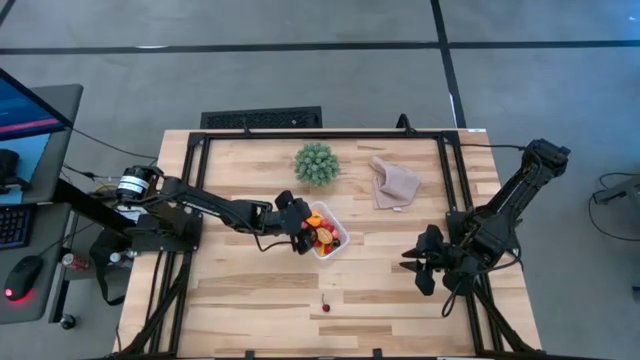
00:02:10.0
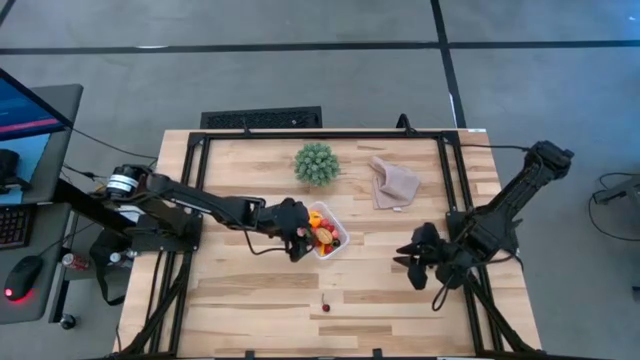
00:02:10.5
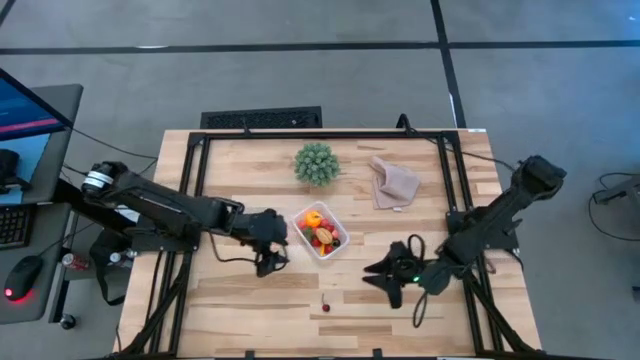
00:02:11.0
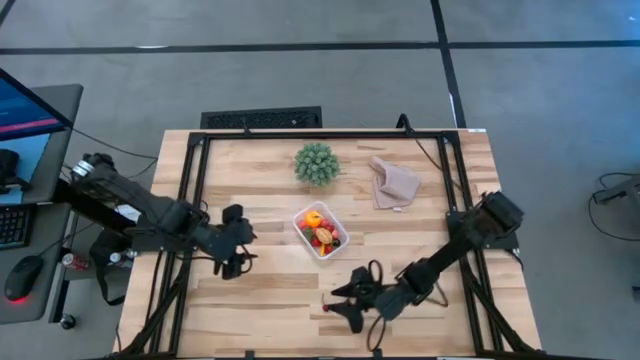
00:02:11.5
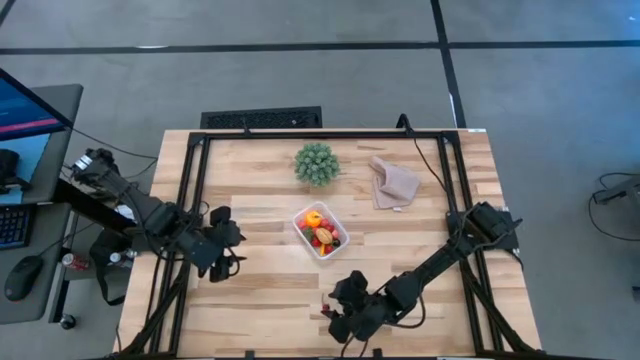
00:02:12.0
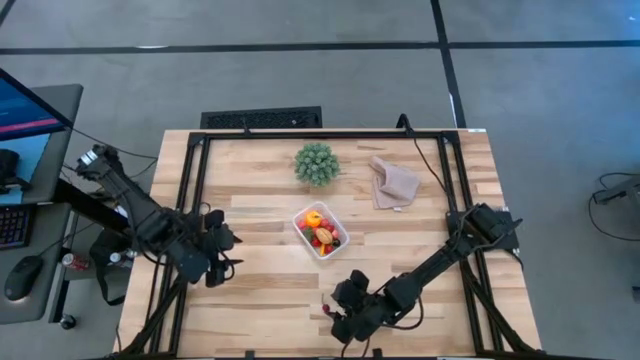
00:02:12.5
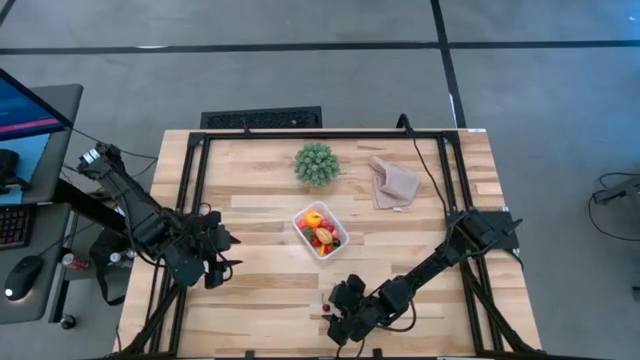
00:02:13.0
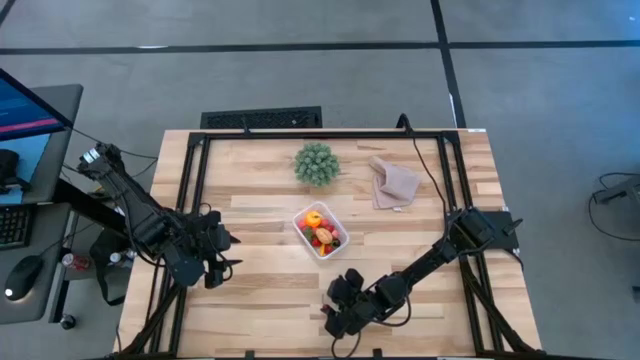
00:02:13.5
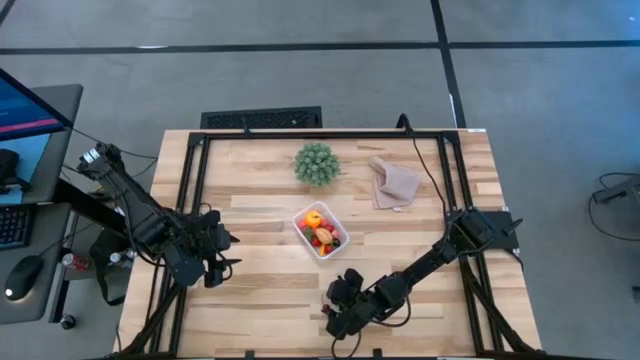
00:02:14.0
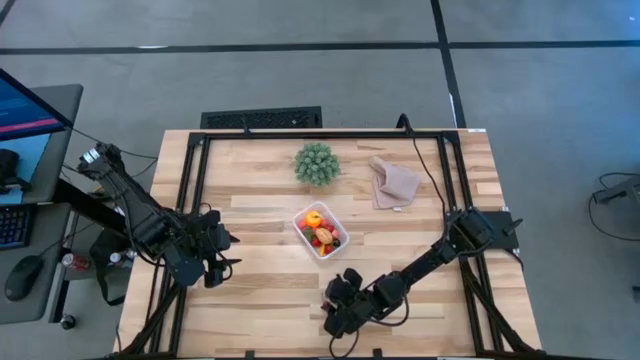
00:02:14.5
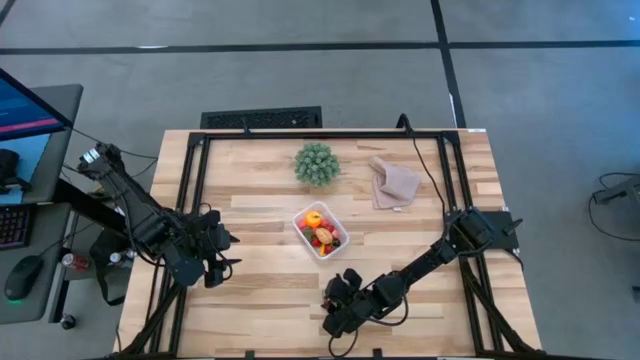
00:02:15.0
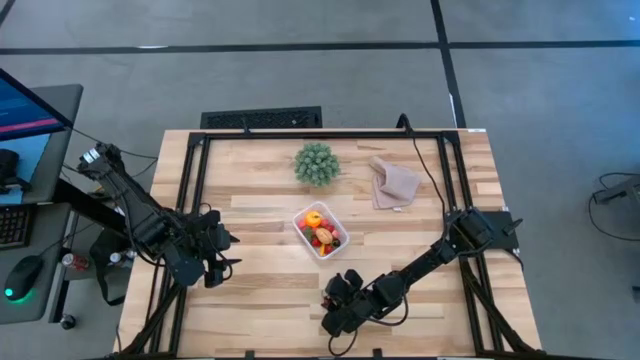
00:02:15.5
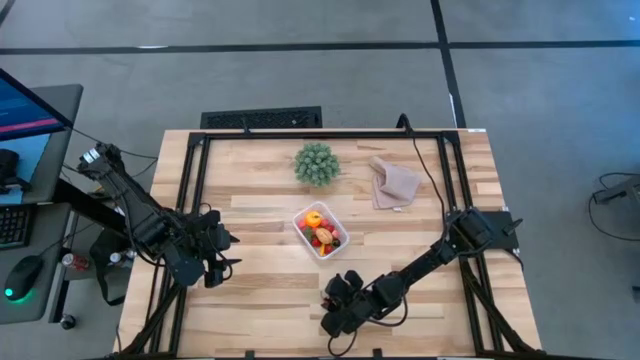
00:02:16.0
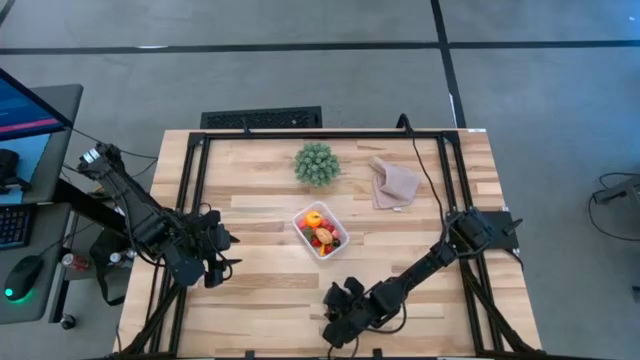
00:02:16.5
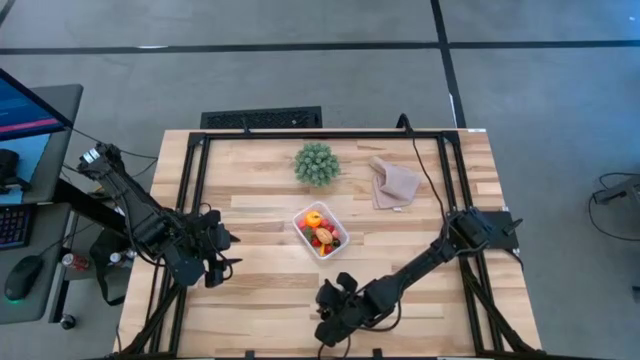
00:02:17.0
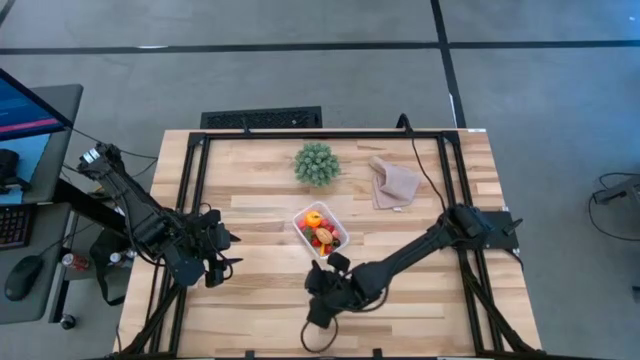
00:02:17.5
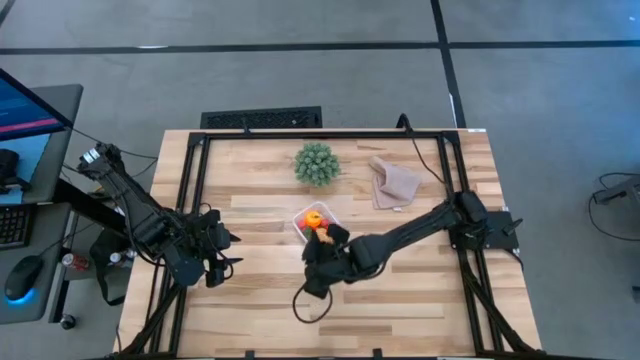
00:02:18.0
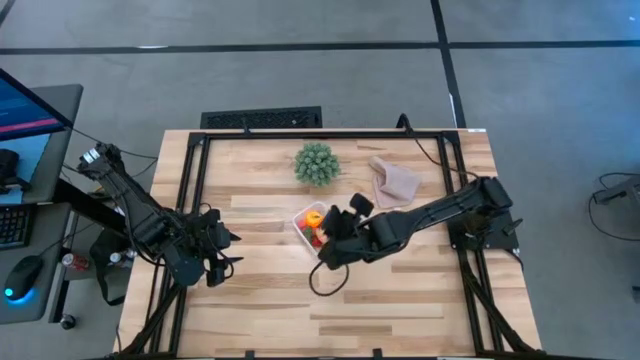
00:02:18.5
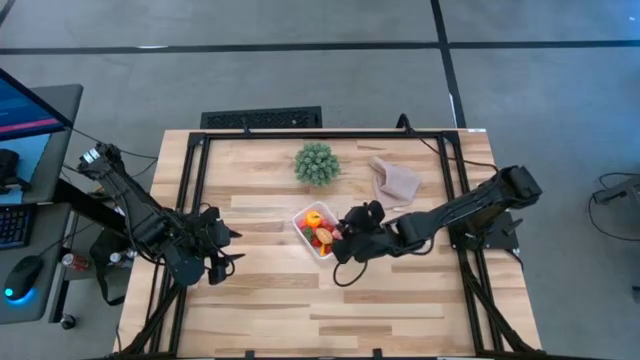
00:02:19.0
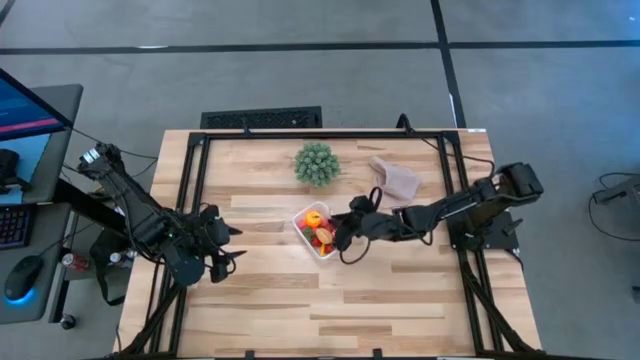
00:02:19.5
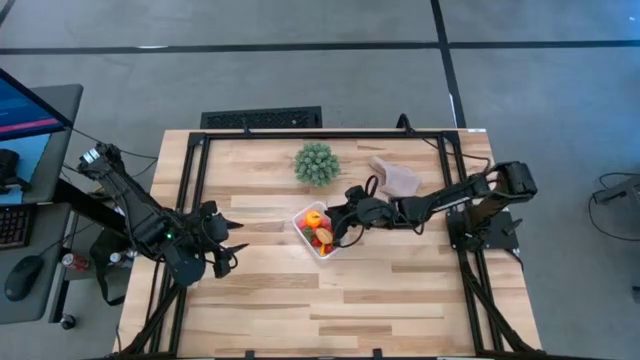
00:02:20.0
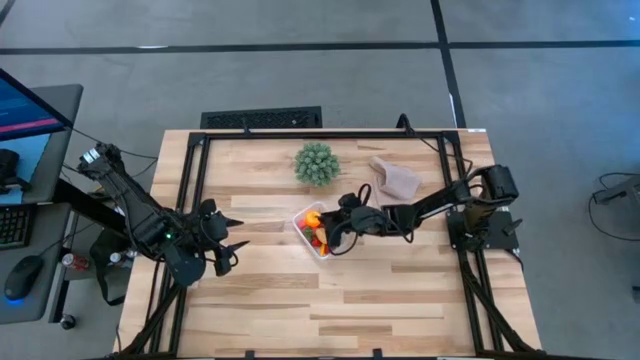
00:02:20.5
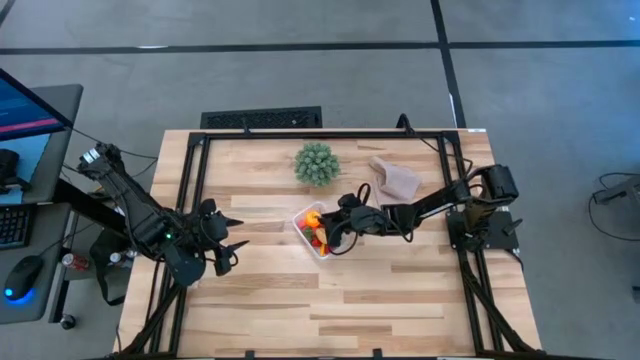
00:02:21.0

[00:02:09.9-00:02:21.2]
Task: Pick and placing Produce into tupperware
Put the red cherry into the transparent container

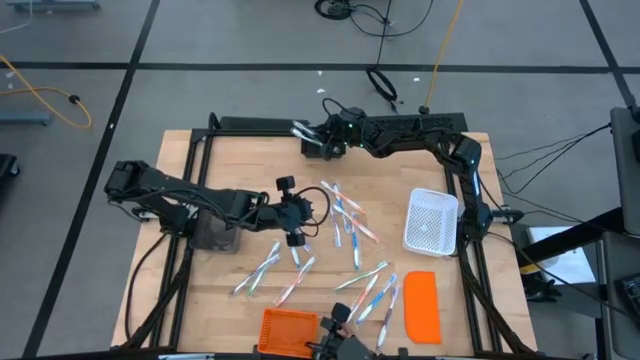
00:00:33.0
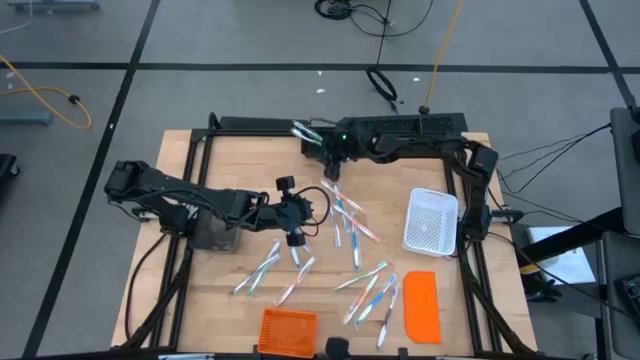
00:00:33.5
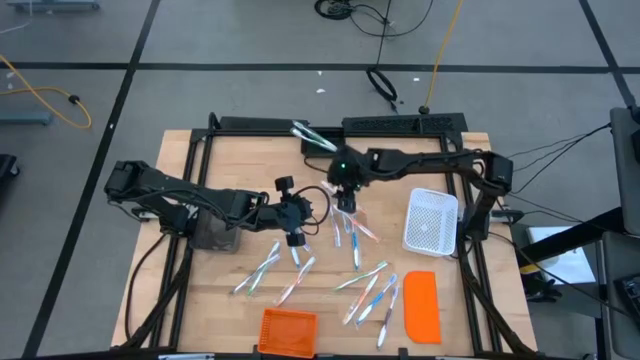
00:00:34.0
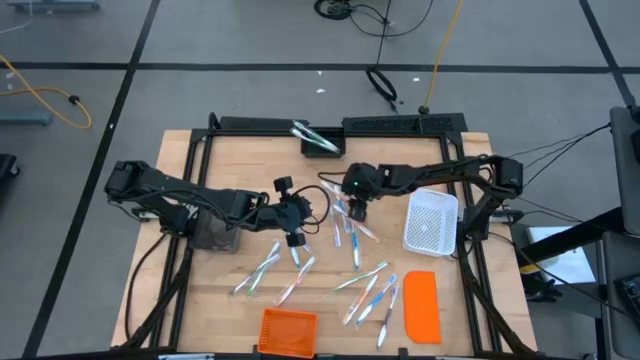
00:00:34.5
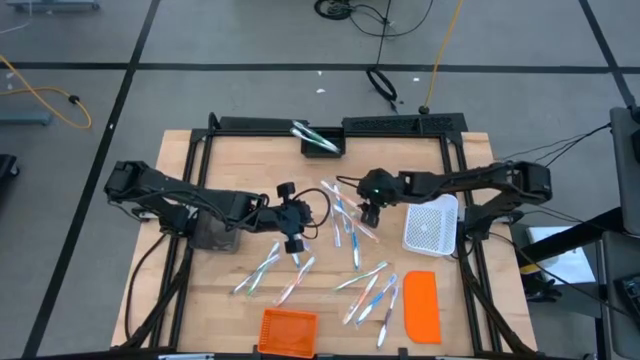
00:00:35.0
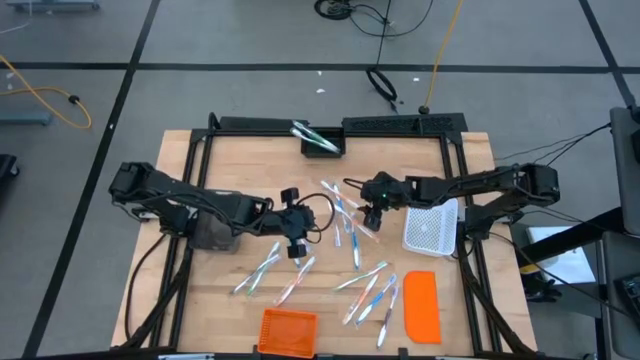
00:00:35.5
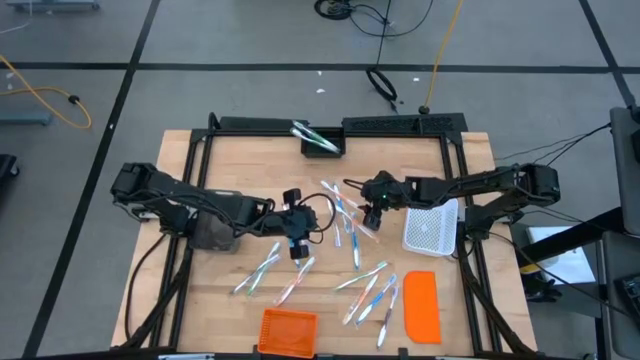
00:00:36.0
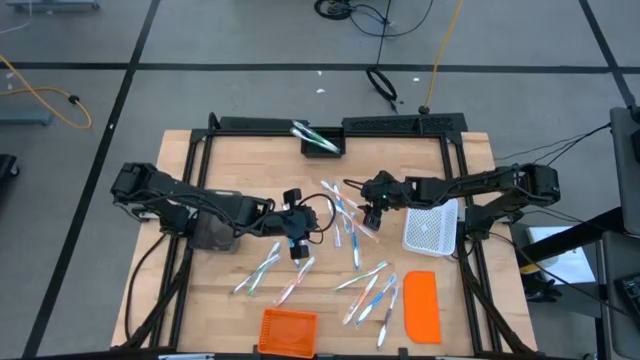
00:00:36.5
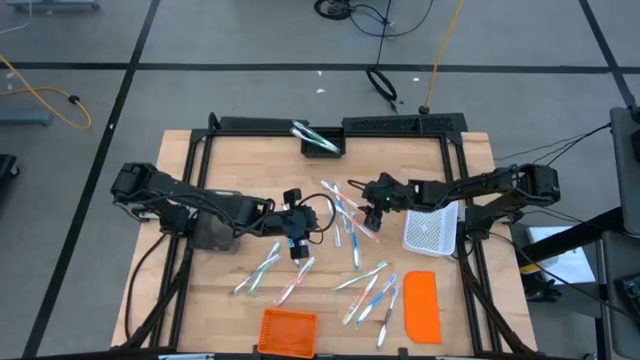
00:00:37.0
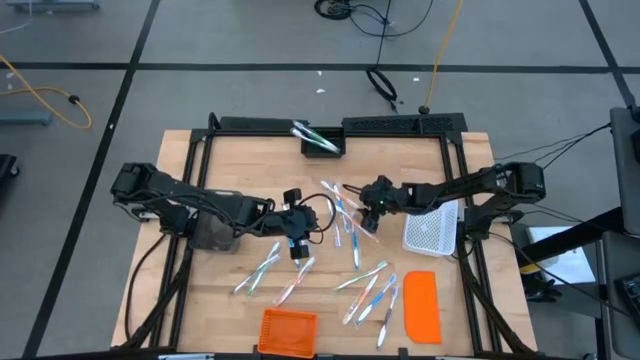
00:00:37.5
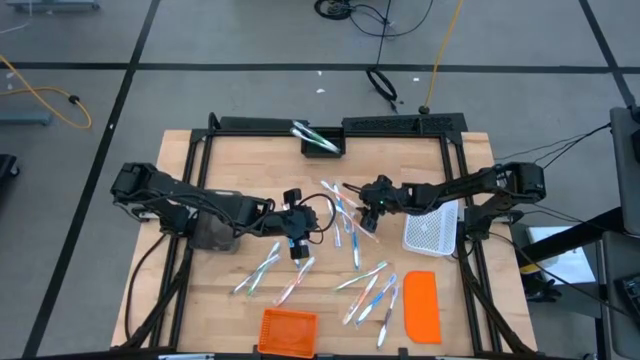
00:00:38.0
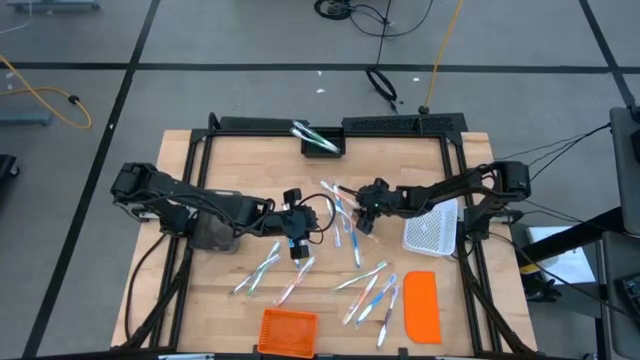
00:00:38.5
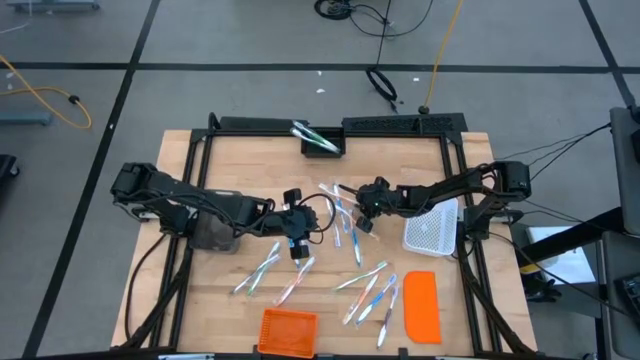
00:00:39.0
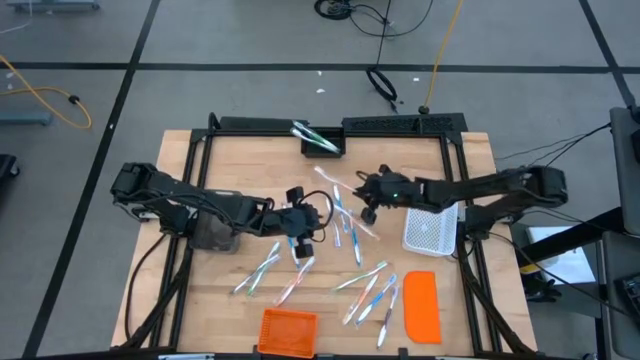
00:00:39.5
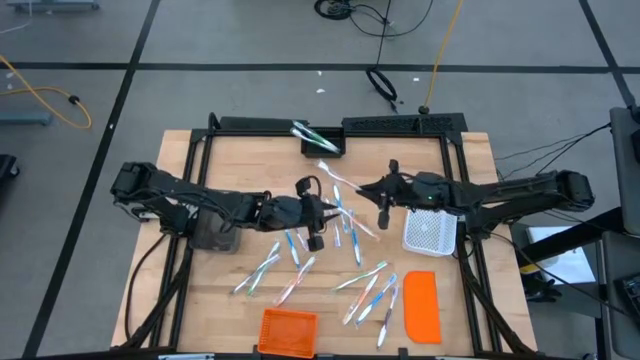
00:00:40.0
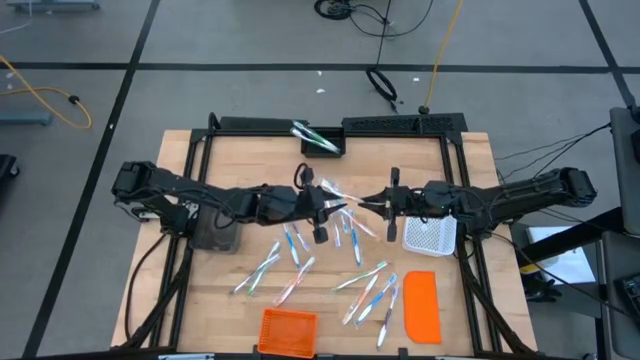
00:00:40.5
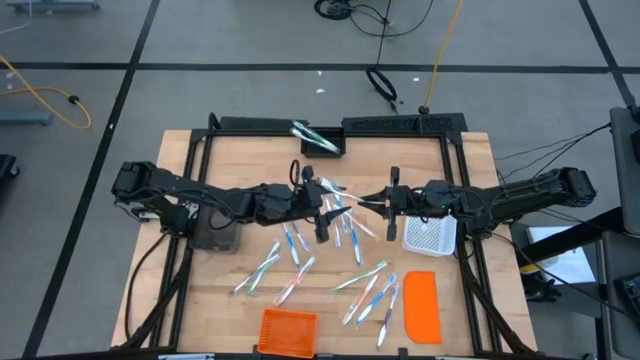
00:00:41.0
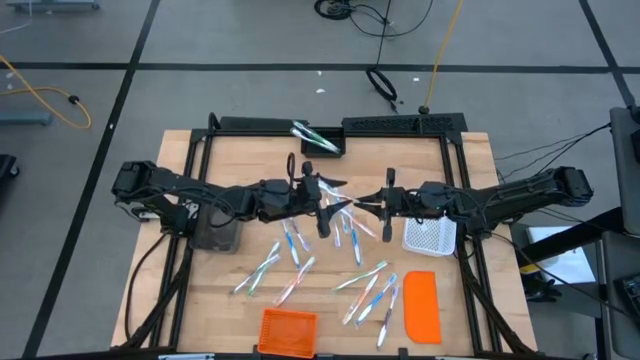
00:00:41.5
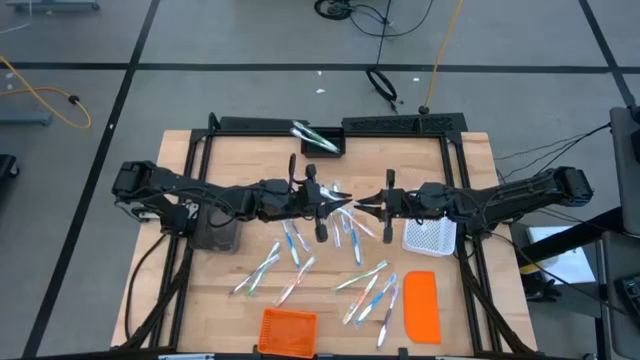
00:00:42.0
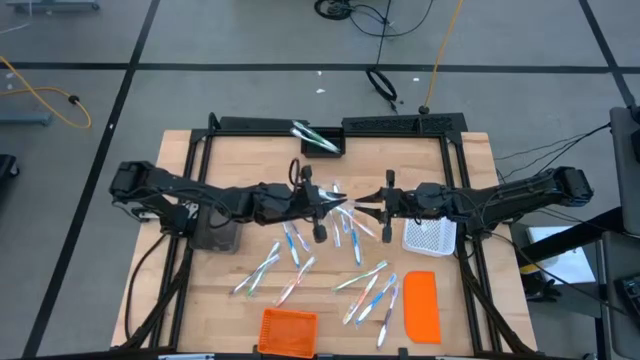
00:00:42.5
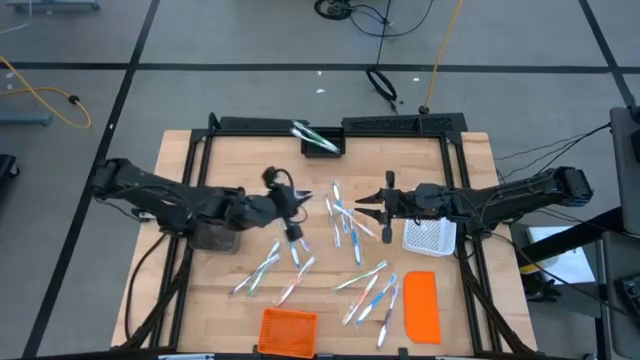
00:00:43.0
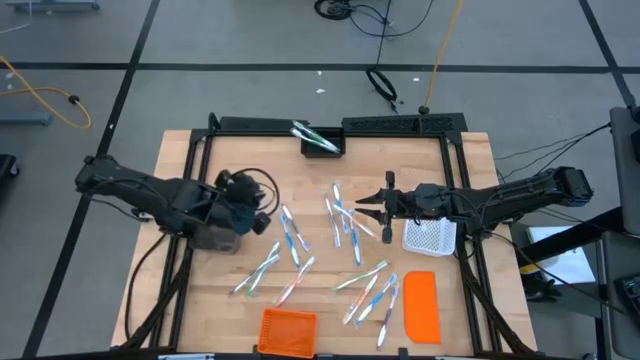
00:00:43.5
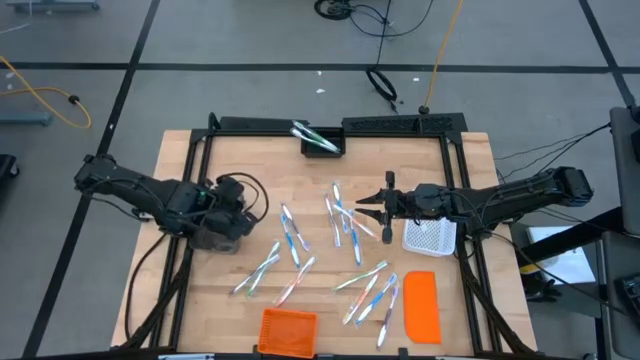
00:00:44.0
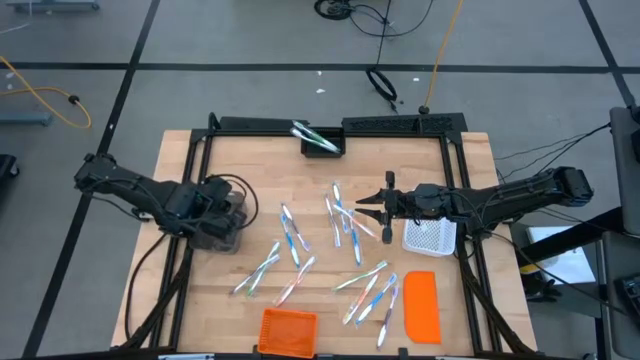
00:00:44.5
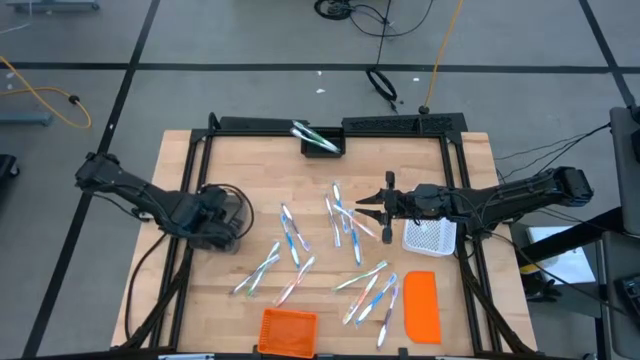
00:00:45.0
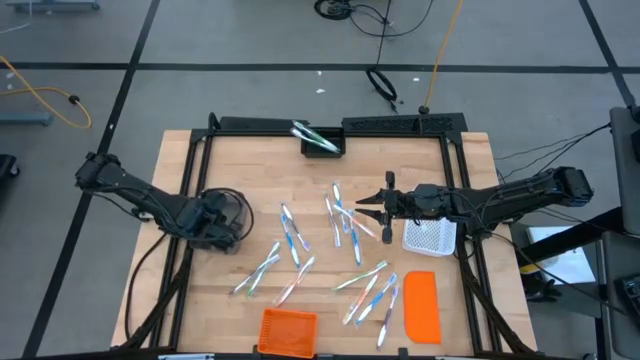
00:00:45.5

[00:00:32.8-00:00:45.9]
Task: Pick & Place Toothbrushes
Put the orange toothbrush into the transparent black bin
